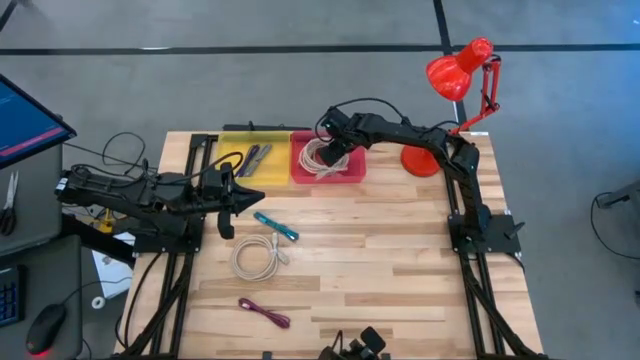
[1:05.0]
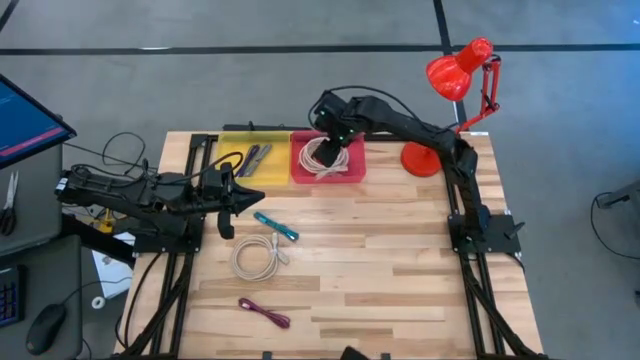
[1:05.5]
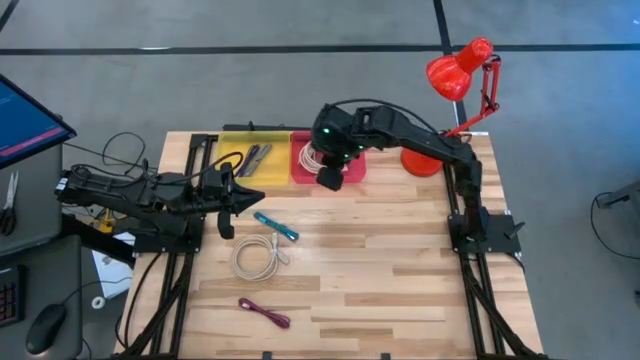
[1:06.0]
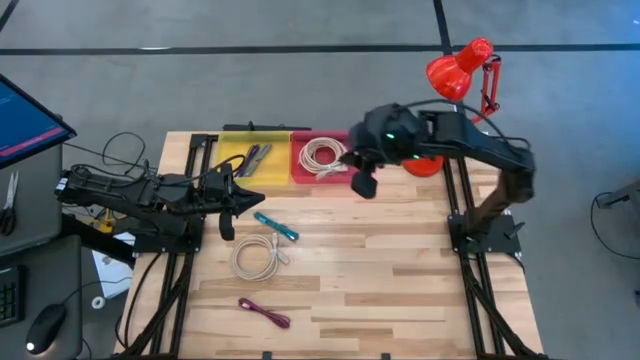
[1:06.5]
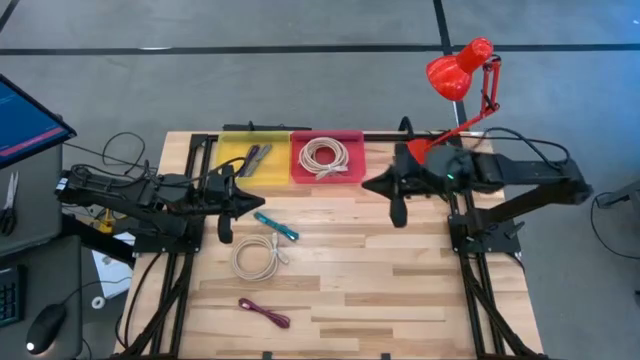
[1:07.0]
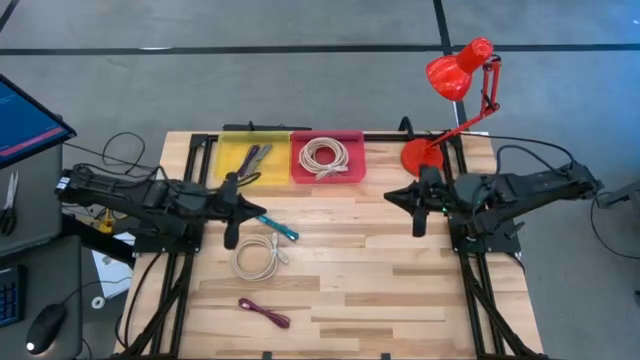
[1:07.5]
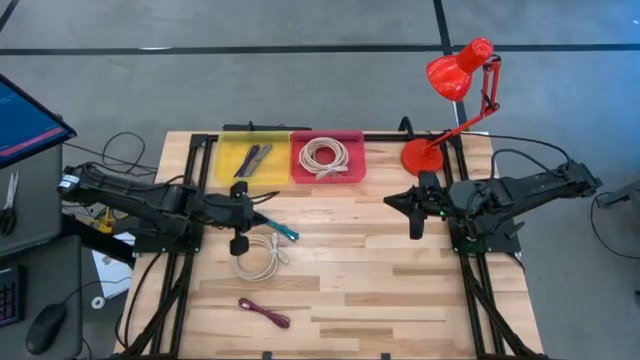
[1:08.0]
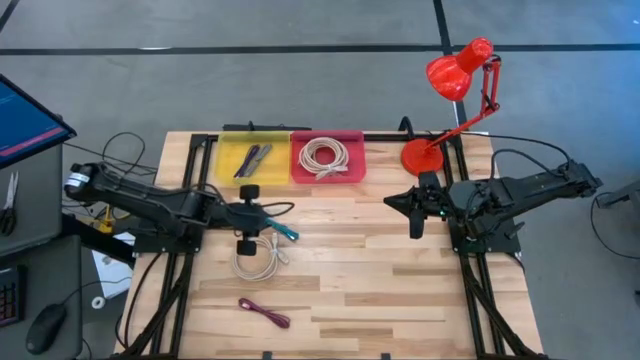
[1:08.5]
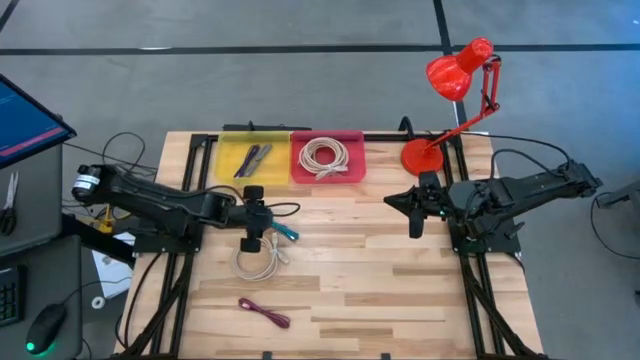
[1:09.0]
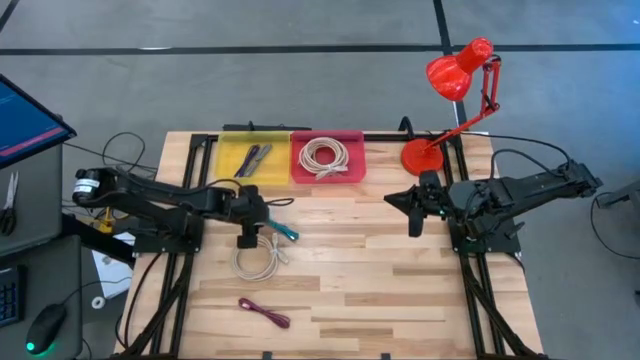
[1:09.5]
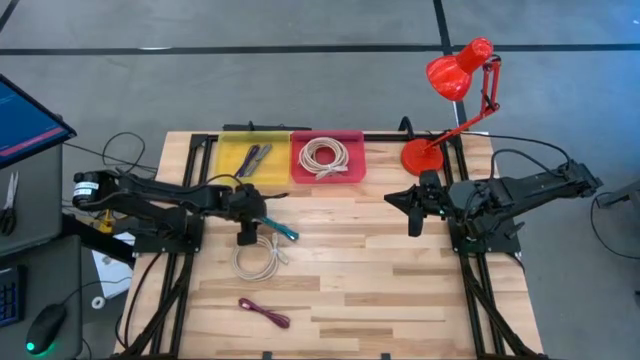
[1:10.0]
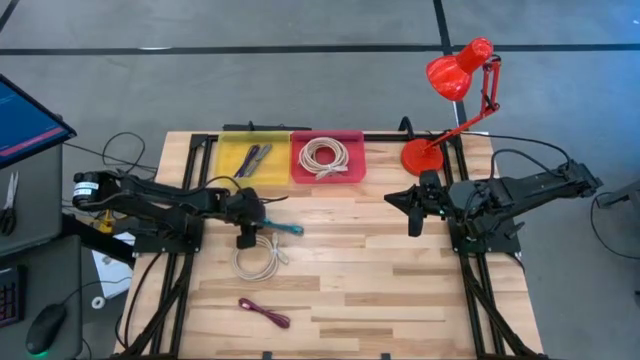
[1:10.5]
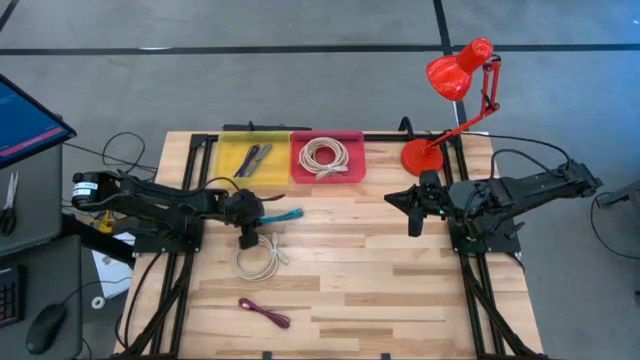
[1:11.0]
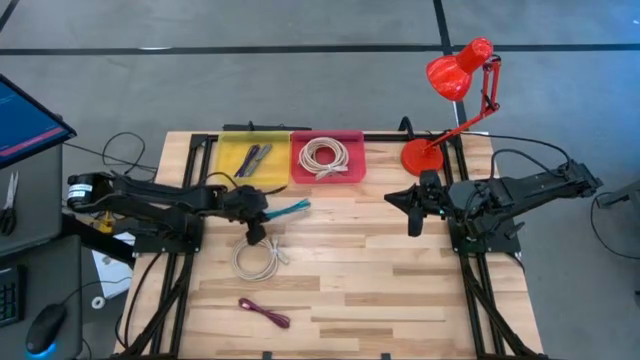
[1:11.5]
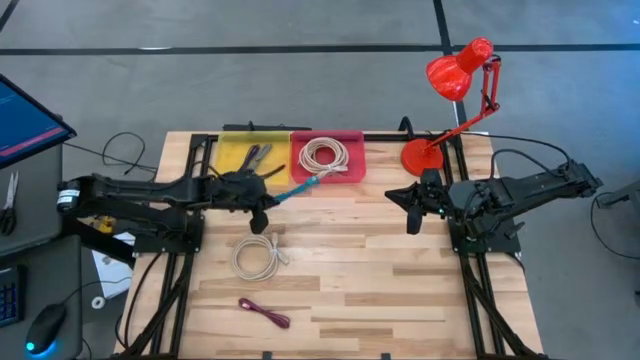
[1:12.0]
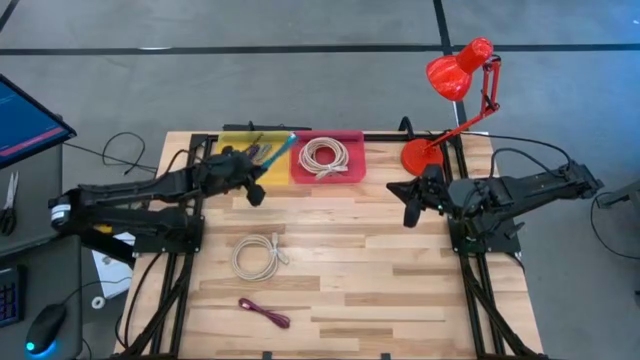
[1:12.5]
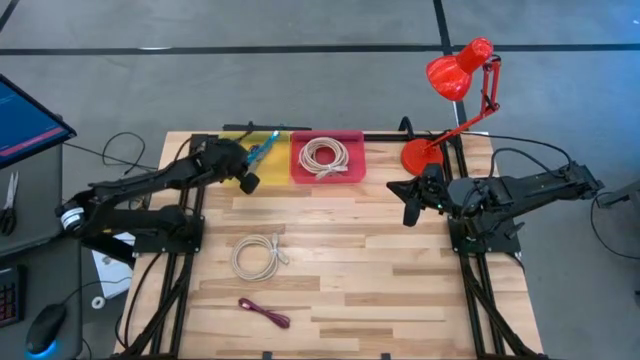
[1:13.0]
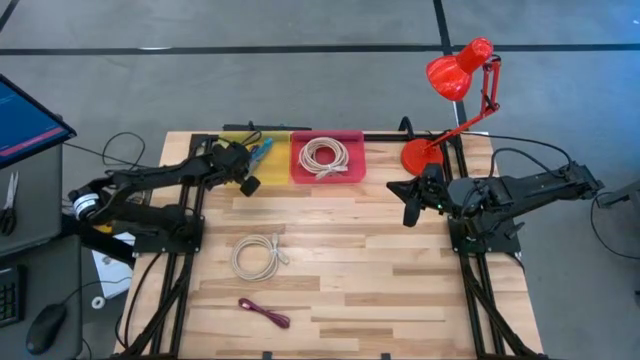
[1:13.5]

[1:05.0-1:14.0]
Task: Pick & Place USB Port
Put the blue charger cable into the yellow bin

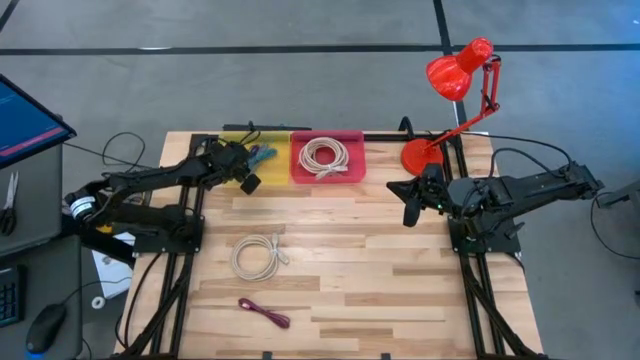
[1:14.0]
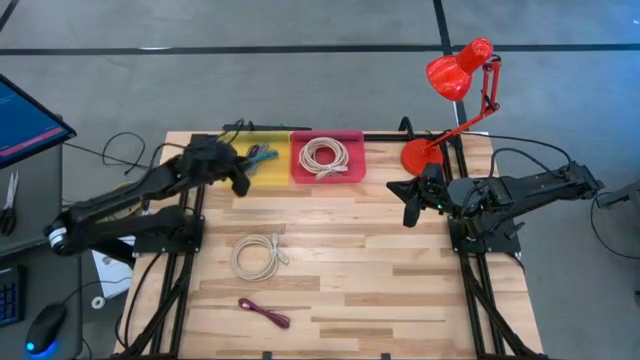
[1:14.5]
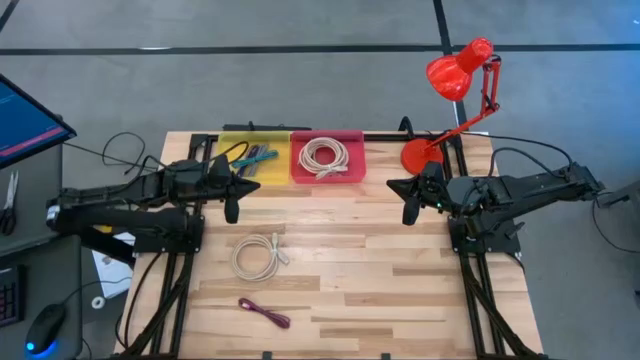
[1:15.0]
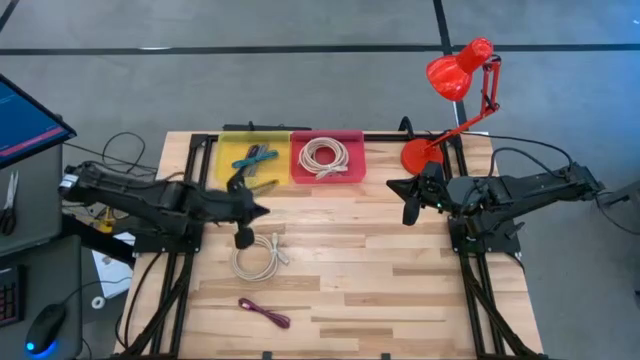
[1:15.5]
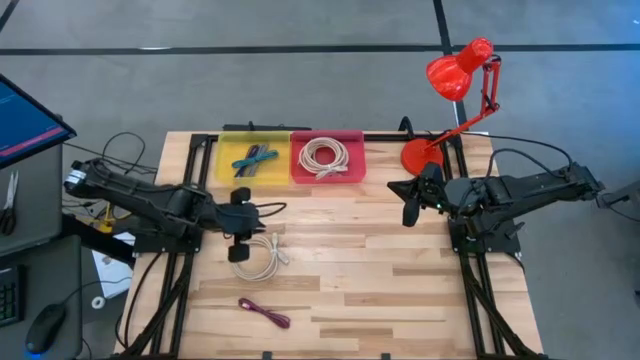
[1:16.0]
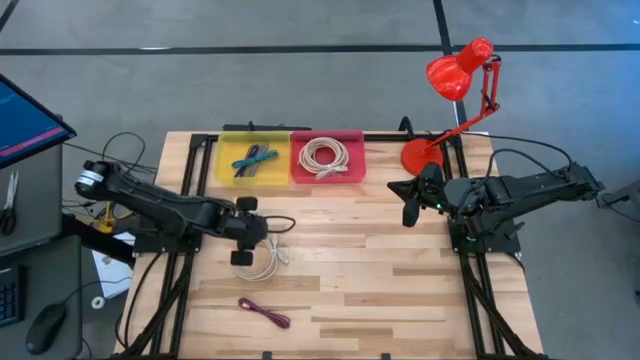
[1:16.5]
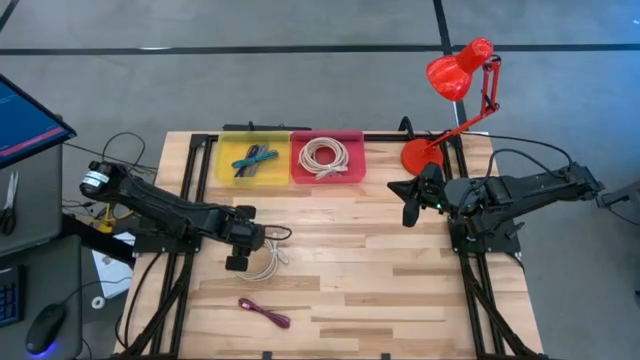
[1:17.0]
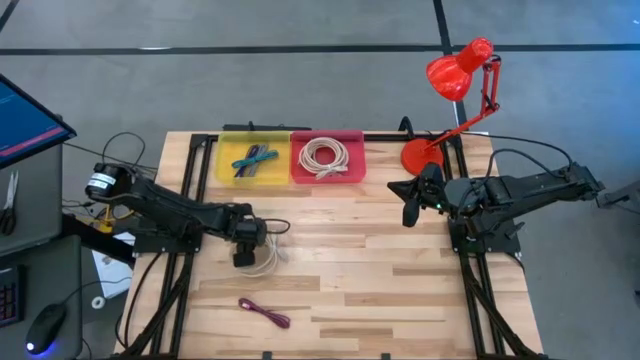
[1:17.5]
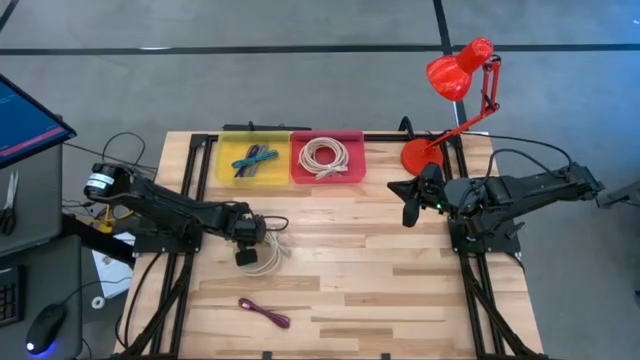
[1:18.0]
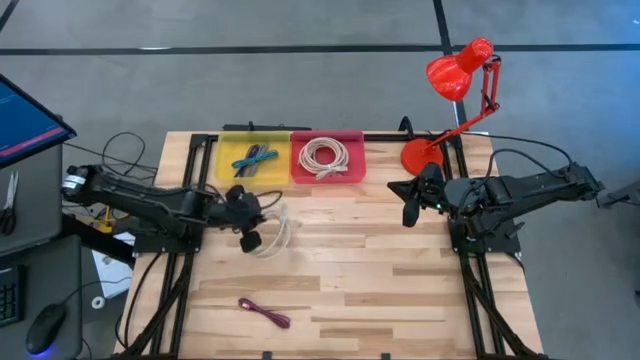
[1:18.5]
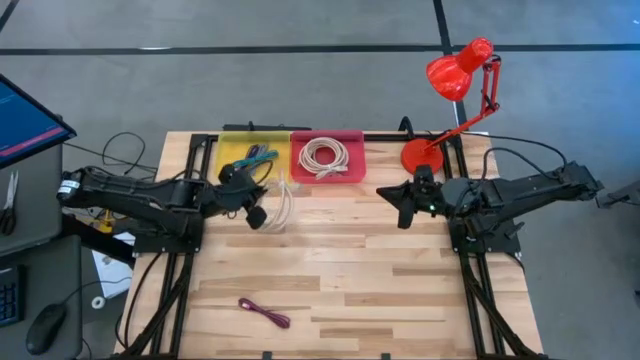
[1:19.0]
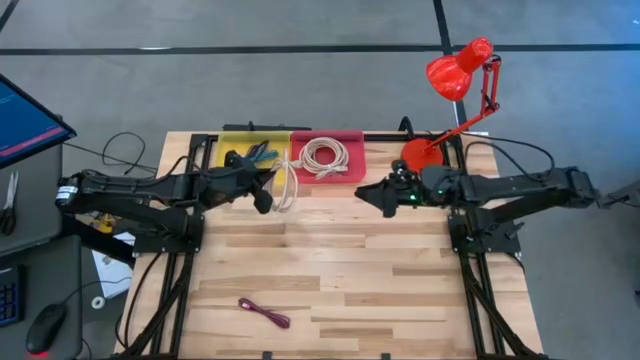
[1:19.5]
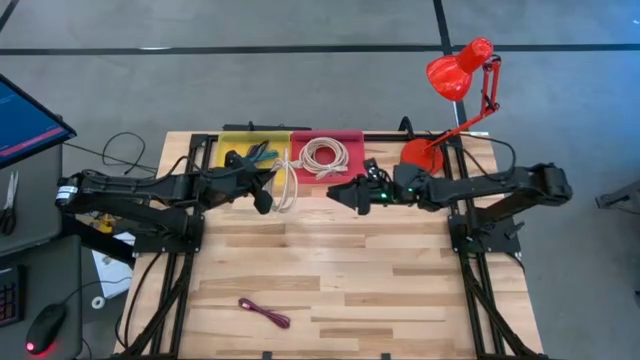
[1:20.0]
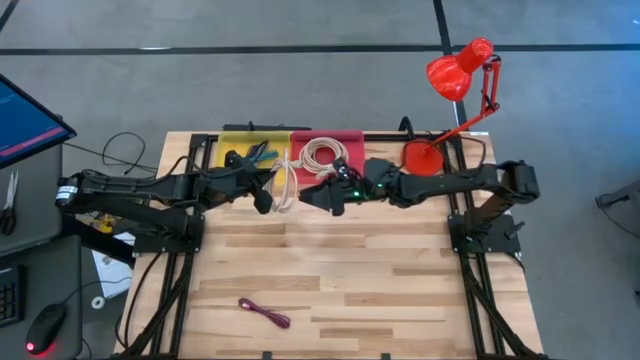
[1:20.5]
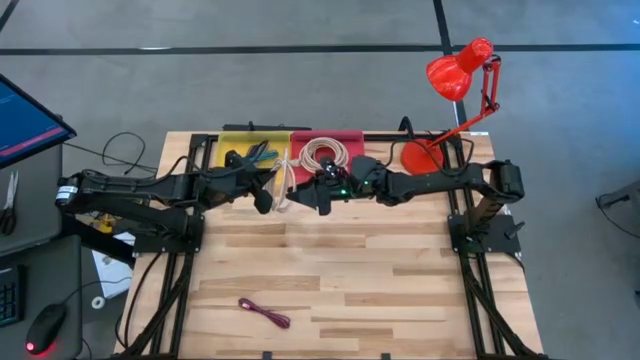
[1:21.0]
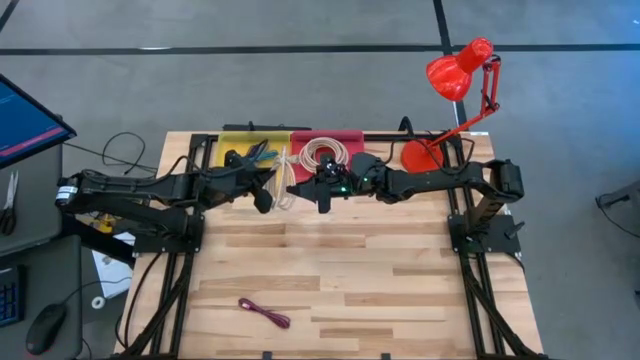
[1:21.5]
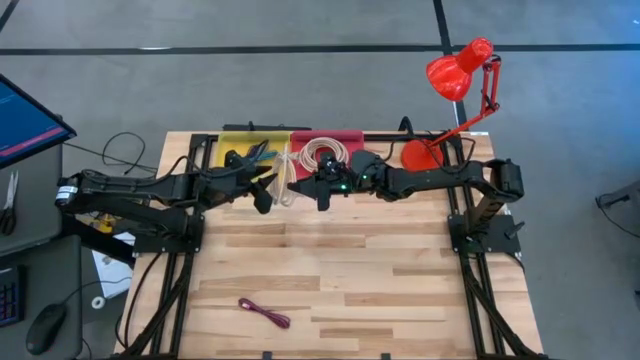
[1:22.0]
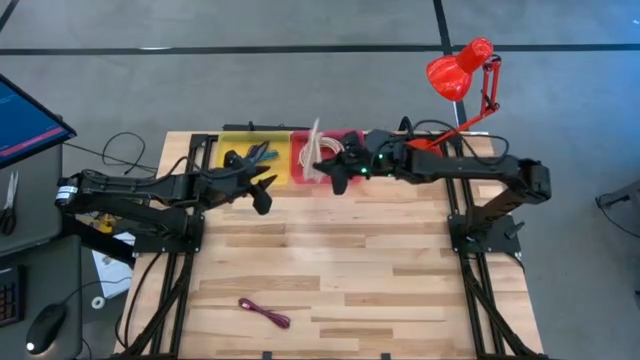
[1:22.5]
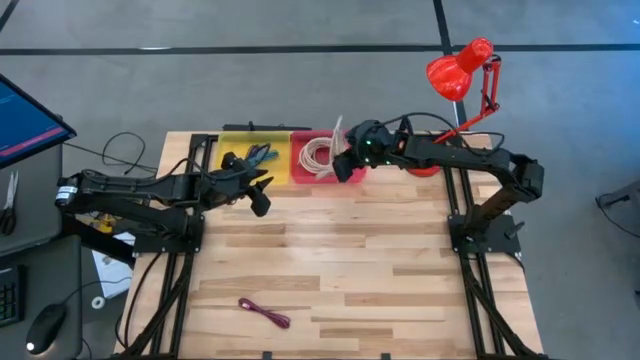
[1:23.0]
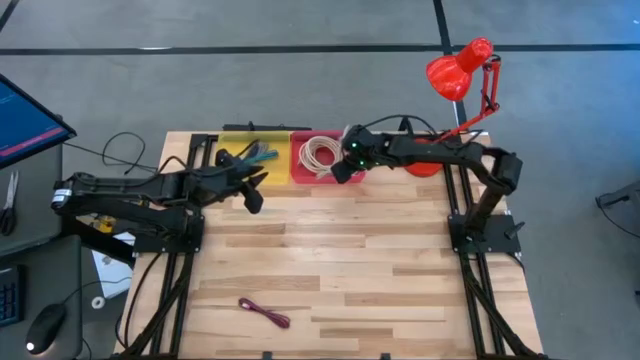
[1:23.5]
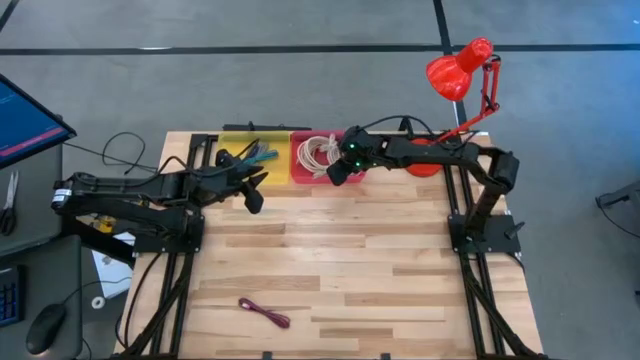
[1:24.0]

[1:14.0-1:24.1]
Put the brown HDMI cable into the pink bin

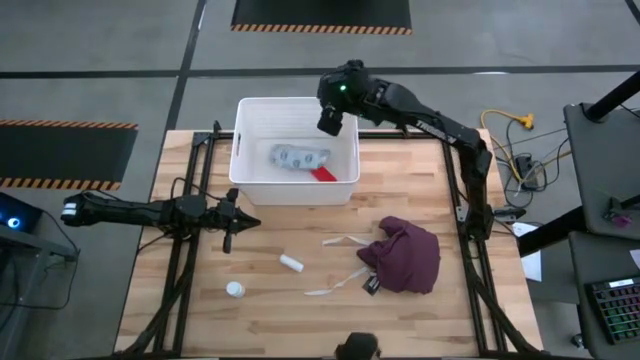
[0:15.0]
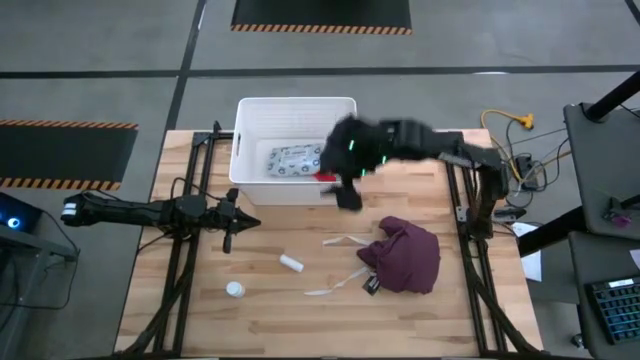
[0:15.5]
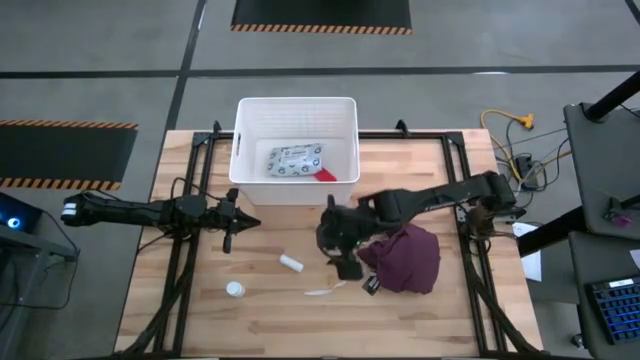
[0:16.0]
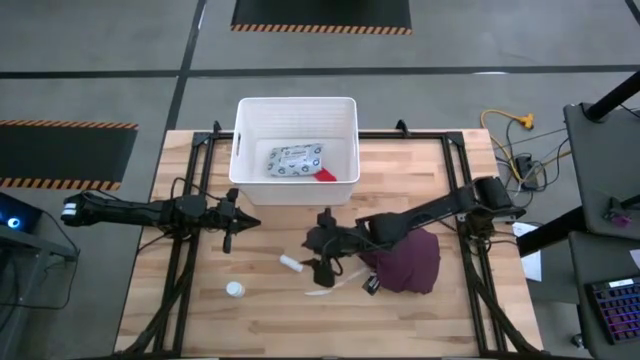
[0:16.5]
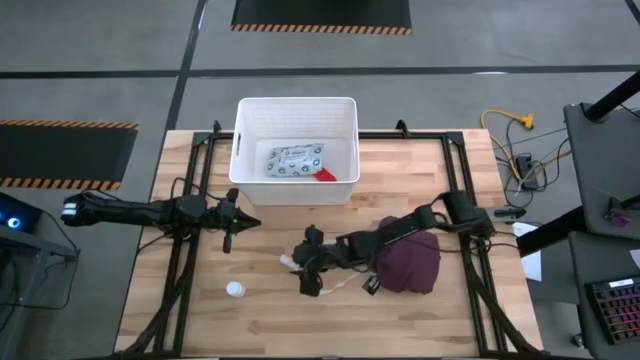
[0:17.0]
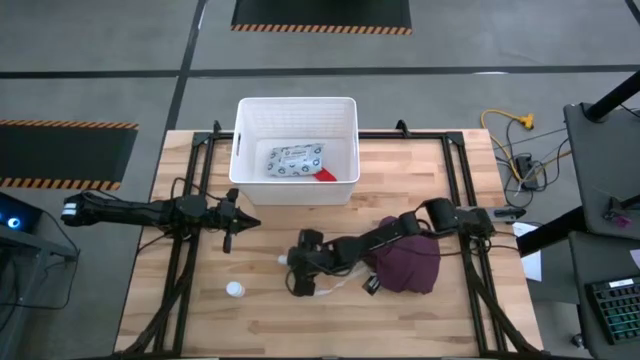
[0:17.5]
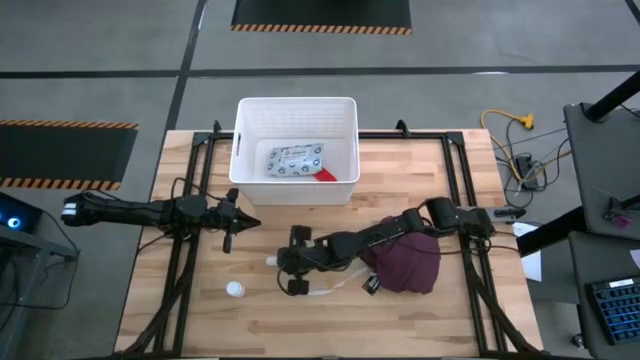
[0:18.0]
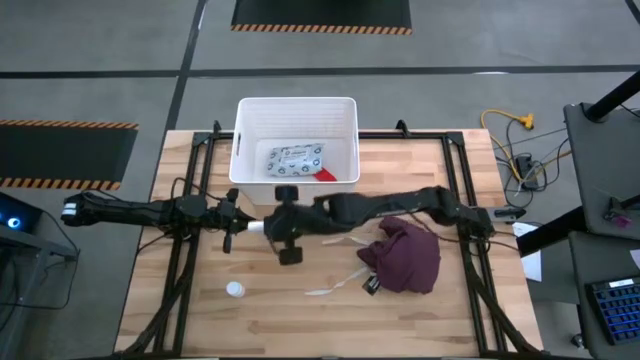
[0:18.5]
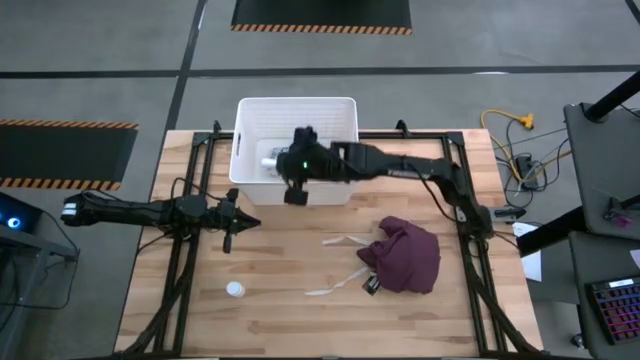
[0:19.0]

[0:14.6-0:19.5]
Task: Pick & place medical supplies in basket/bin
Put the white rolled gauze into the white bin
